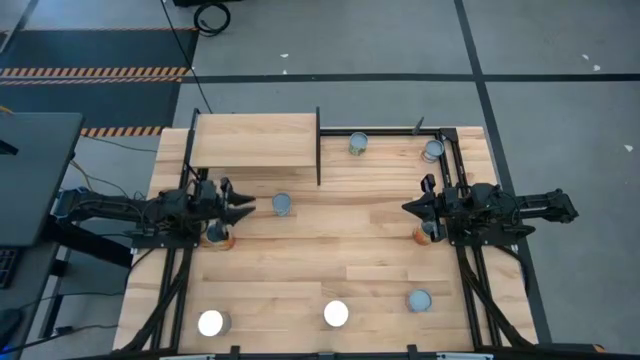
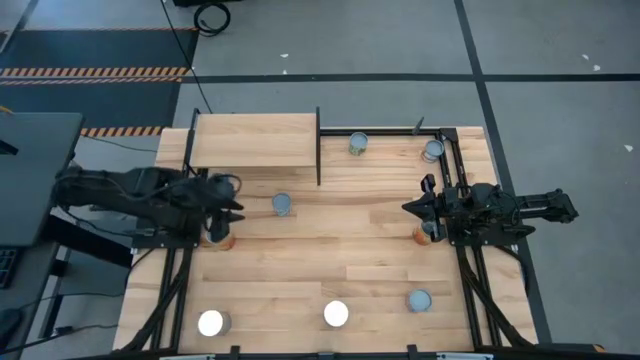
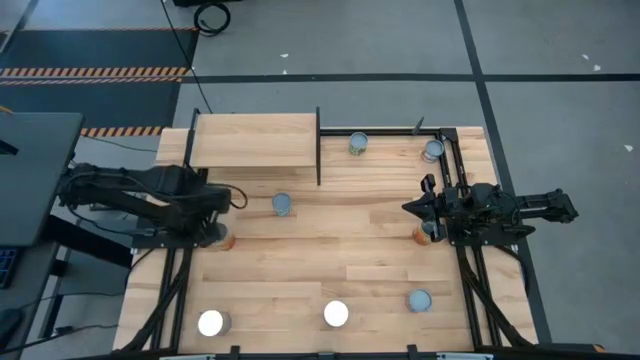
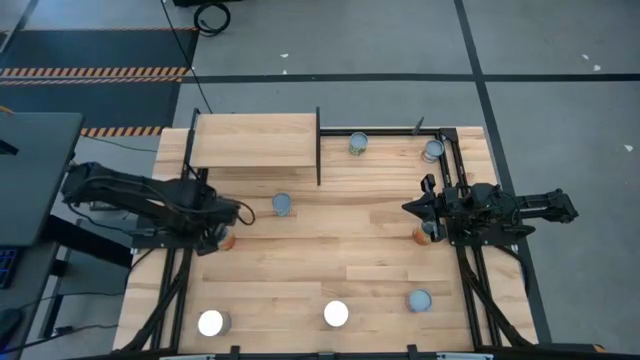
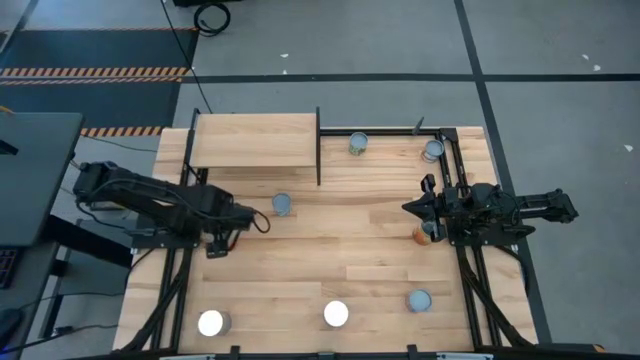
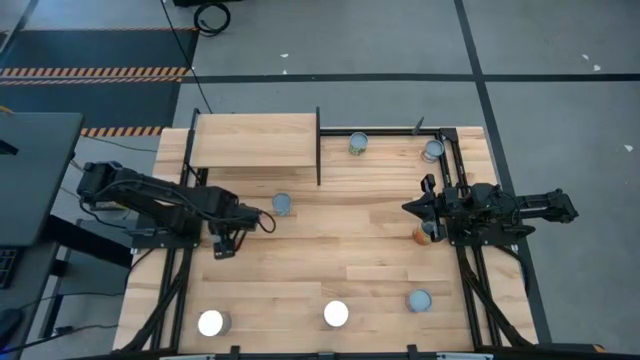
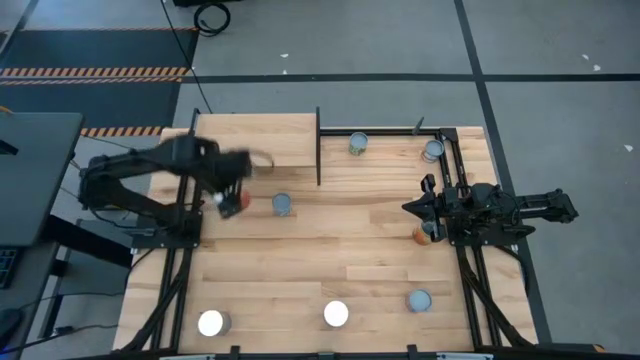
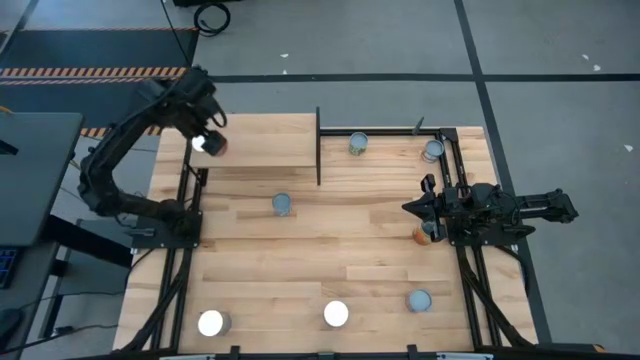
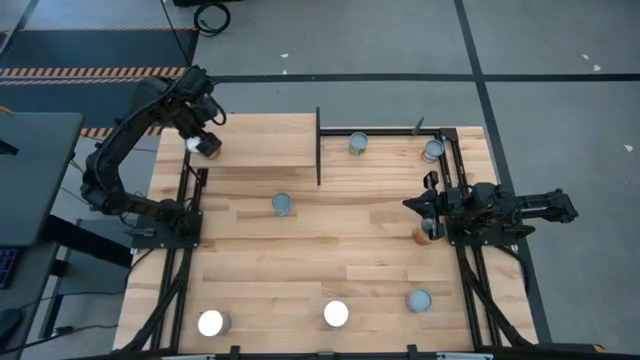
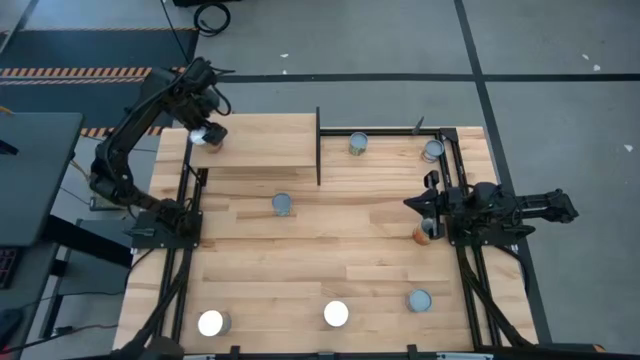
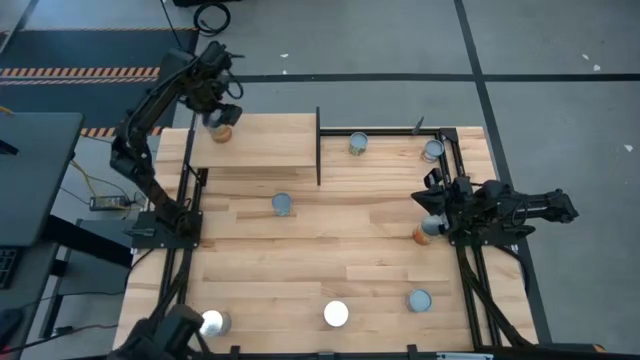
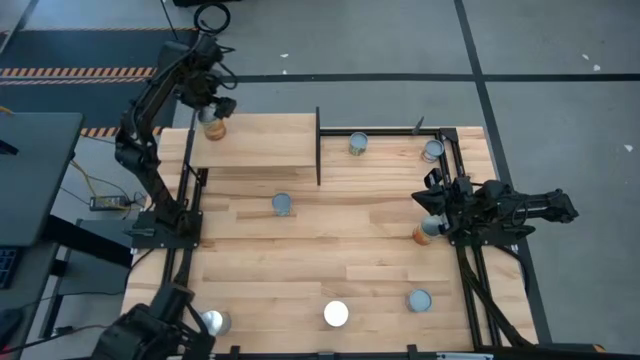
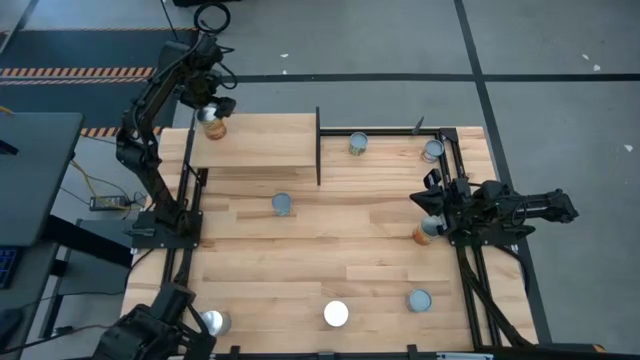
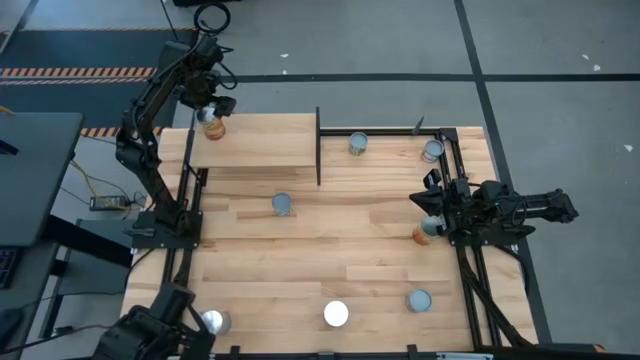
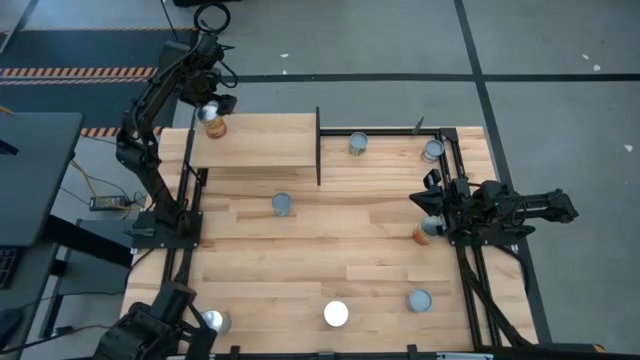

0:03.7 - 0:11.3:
Task: Pick and place cans onto a shelf
Put the left large canned corn on the shelf

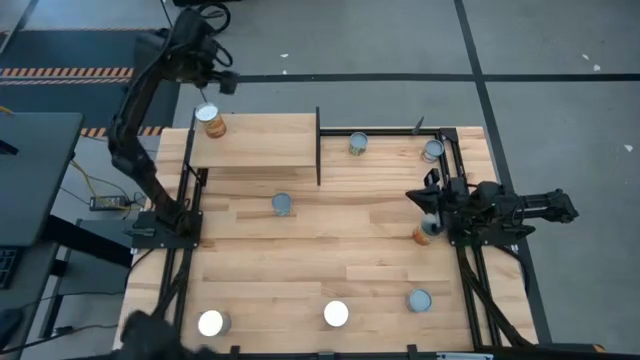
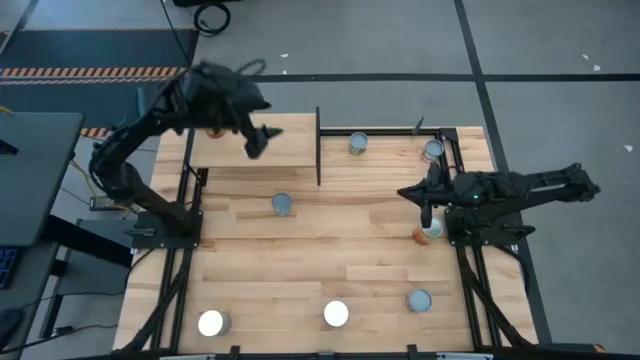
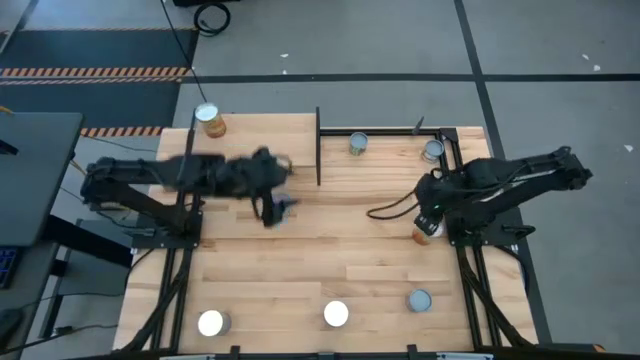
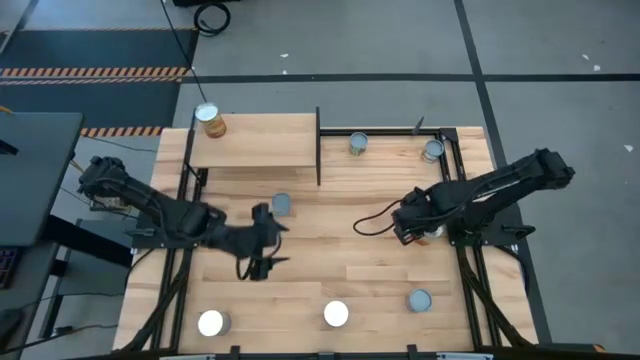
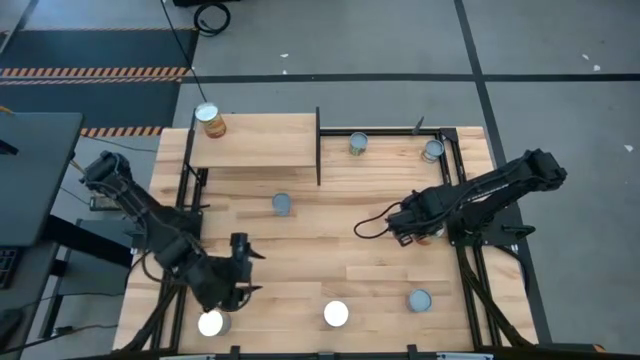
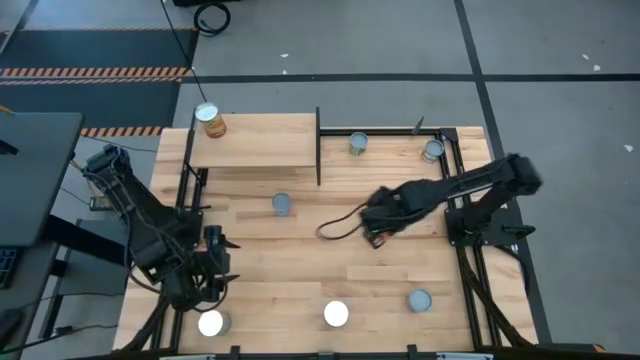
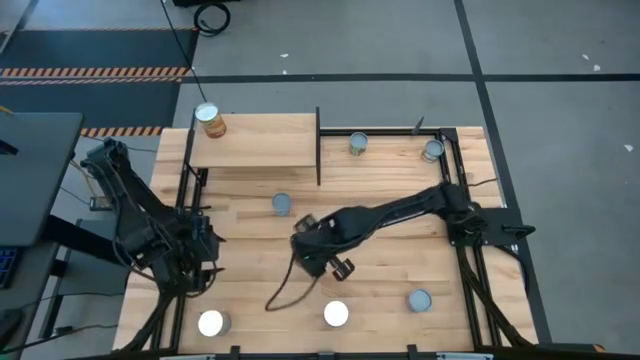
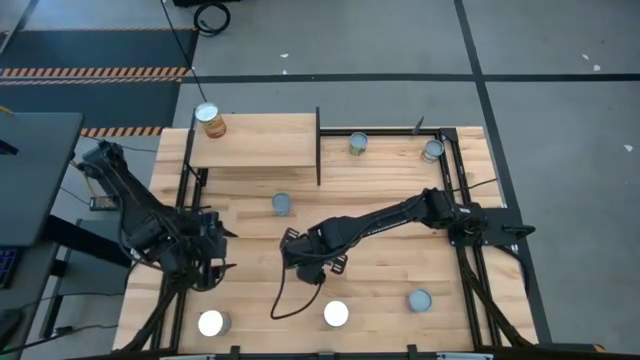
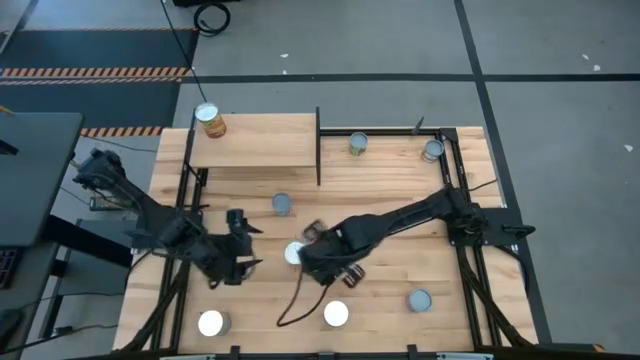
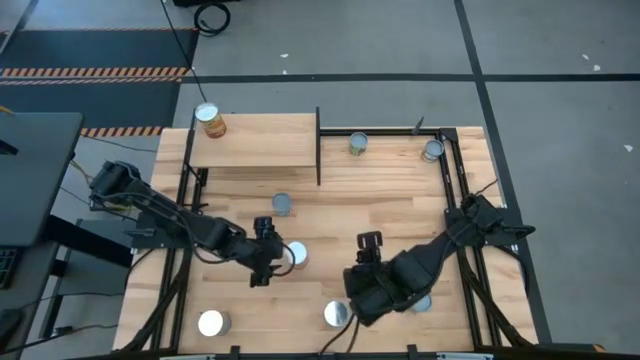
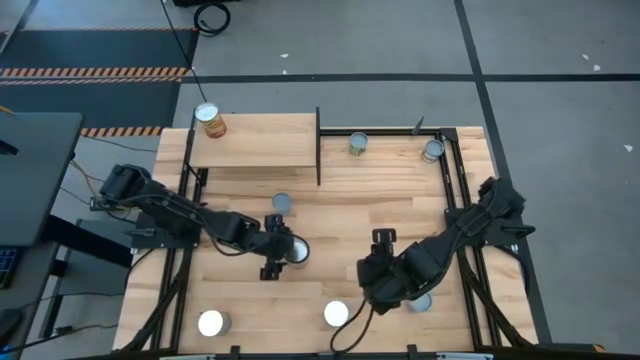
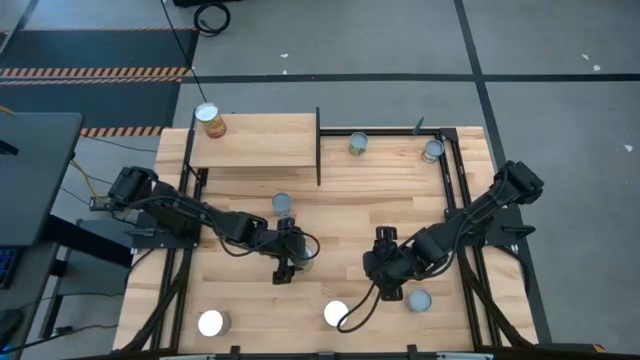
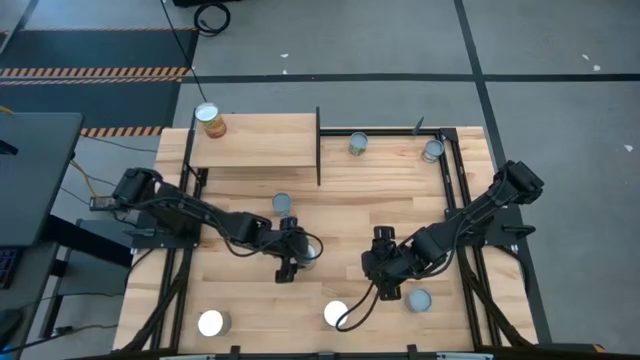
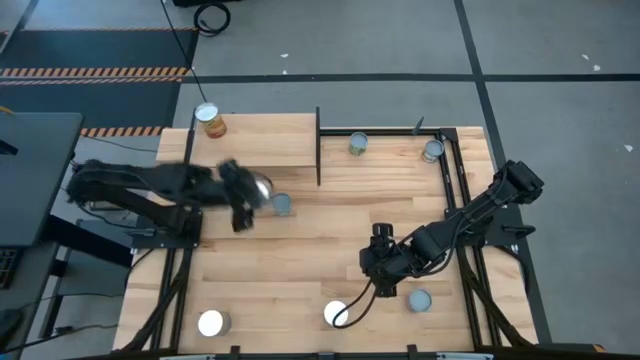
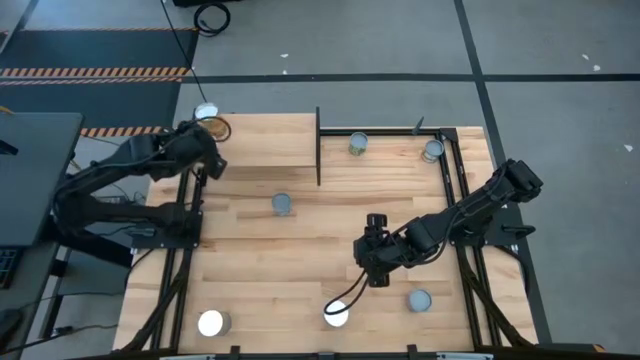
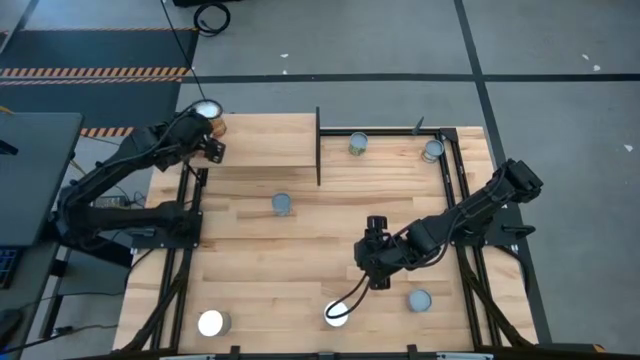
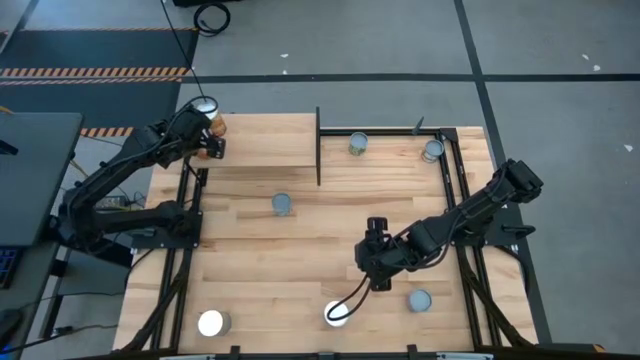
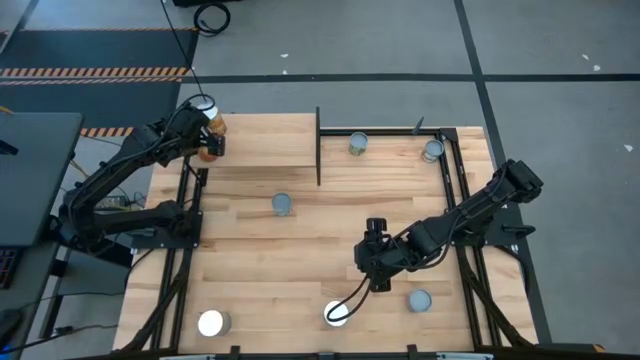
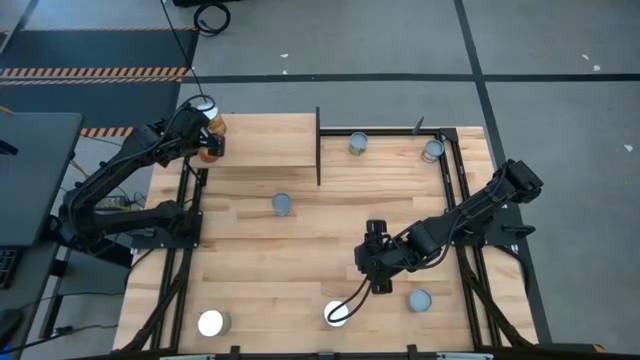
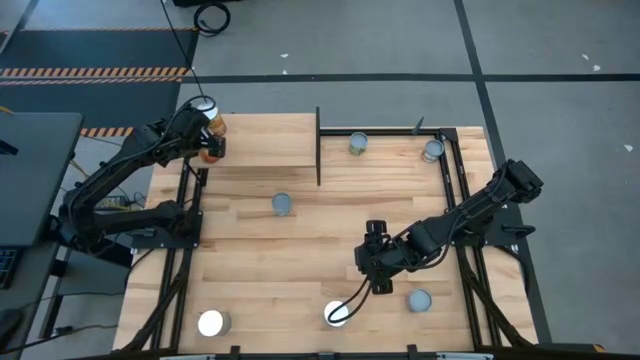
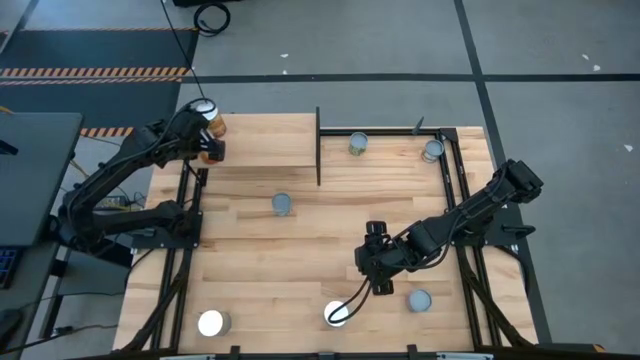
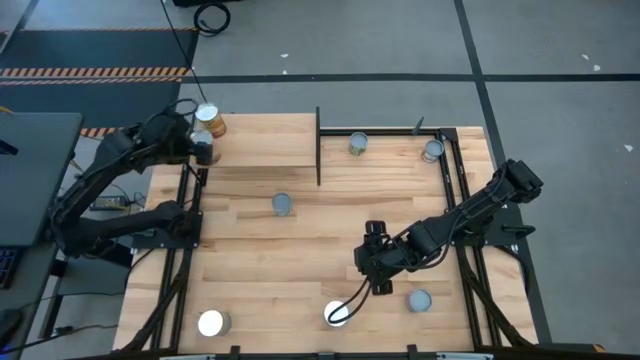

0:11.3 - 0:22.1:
Put the large canned corn on the shelf

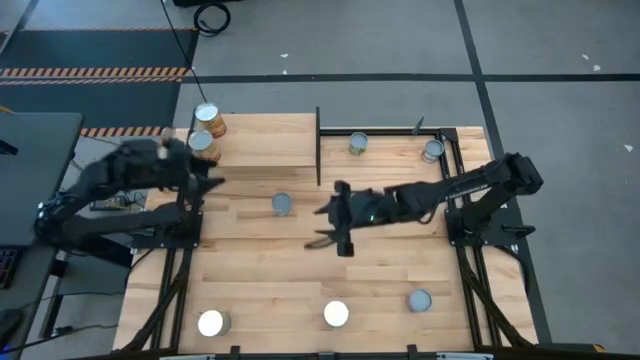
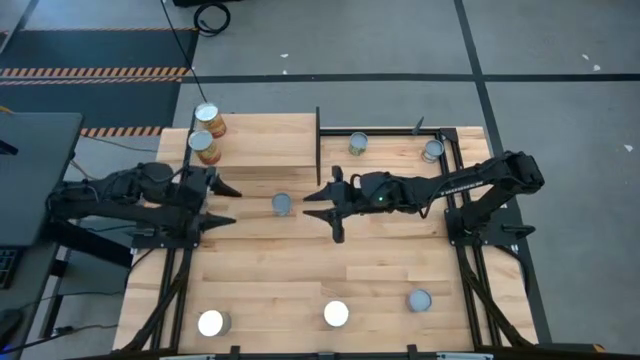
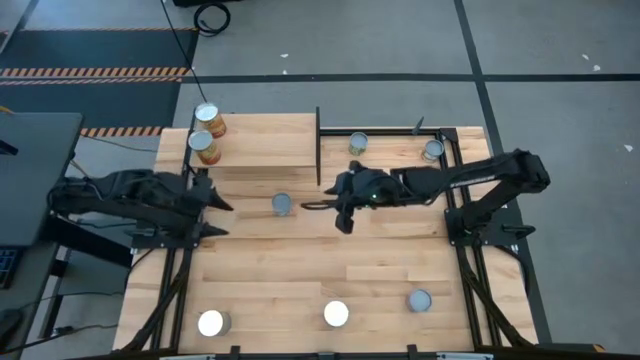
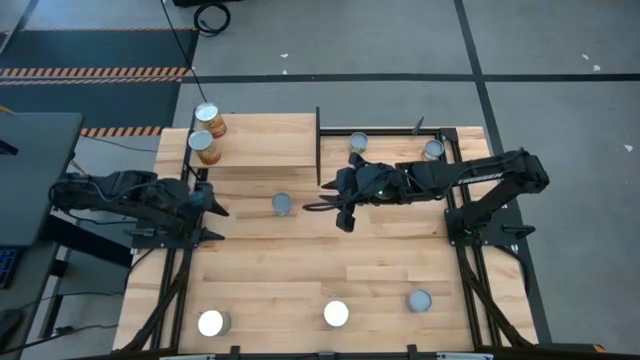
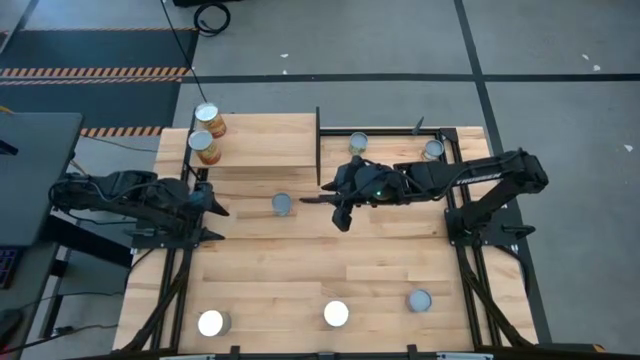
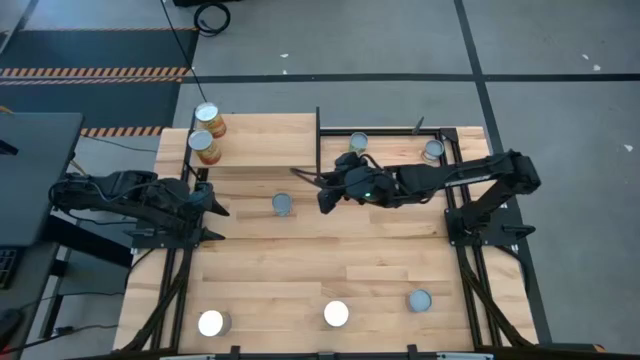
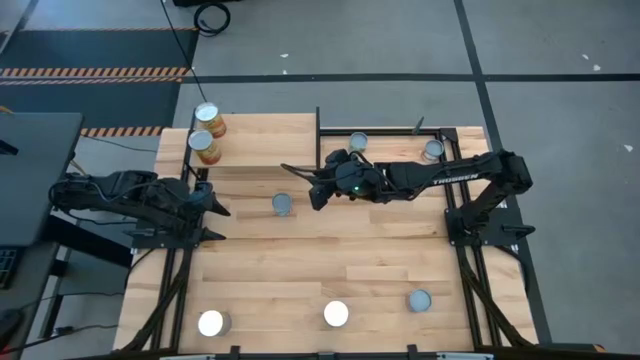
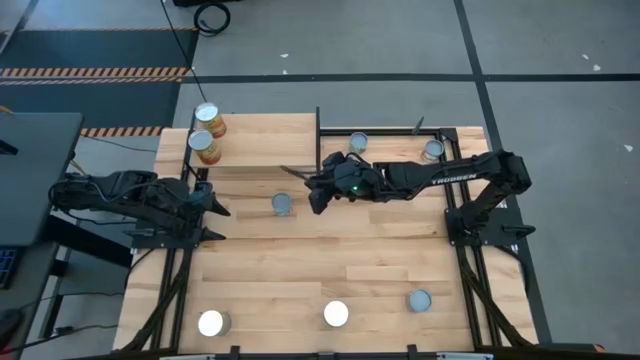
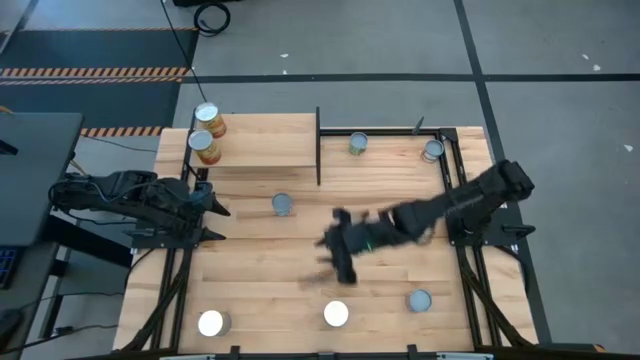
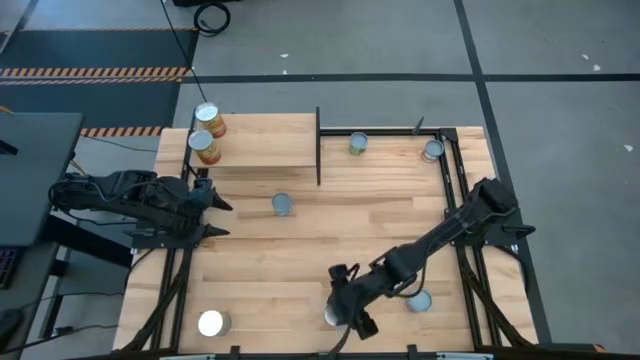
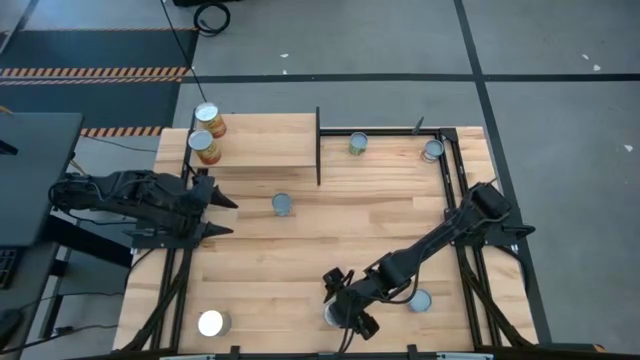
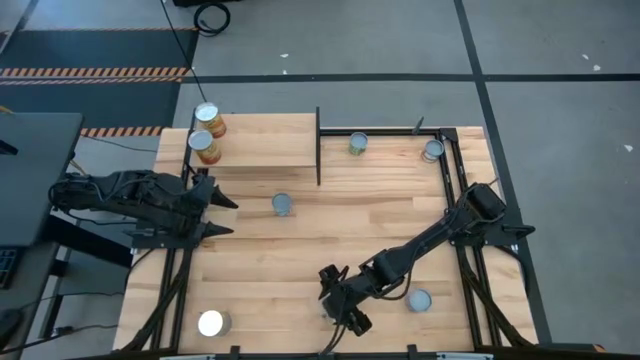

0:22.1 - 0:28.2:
Put the right canned peaches on the shelf
